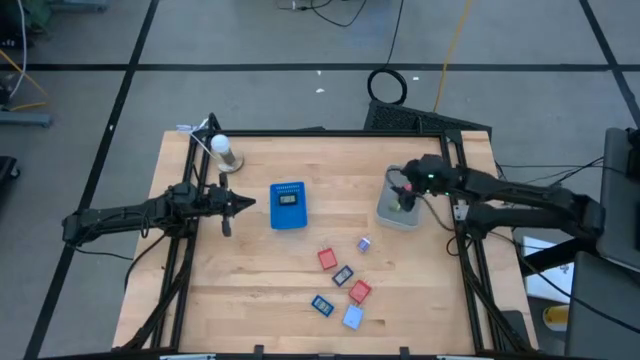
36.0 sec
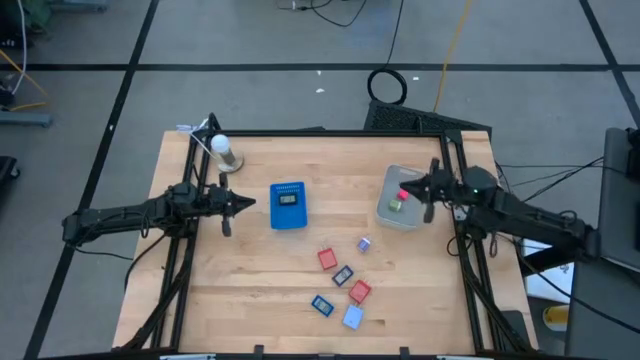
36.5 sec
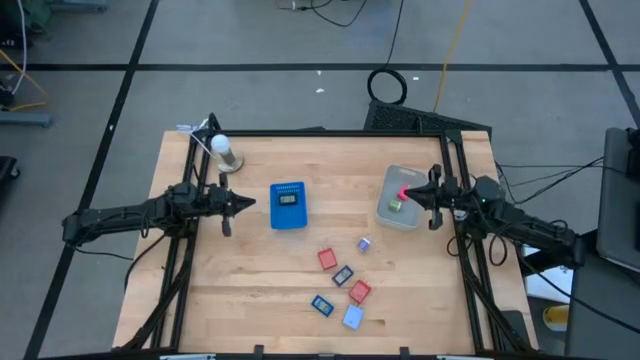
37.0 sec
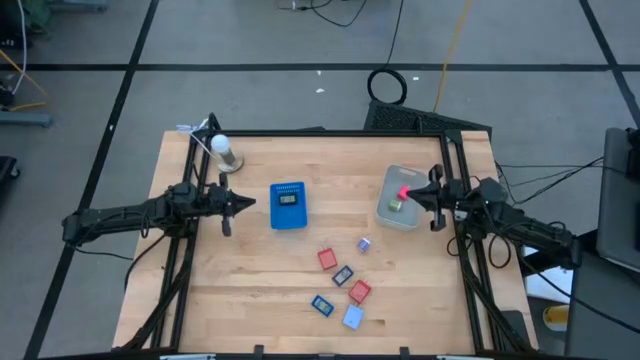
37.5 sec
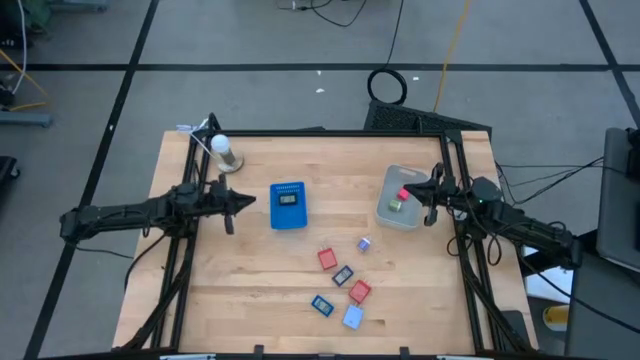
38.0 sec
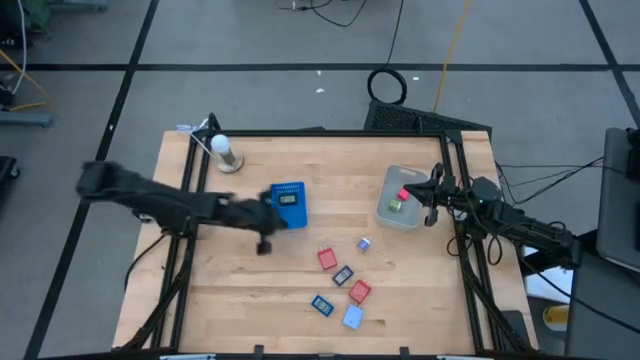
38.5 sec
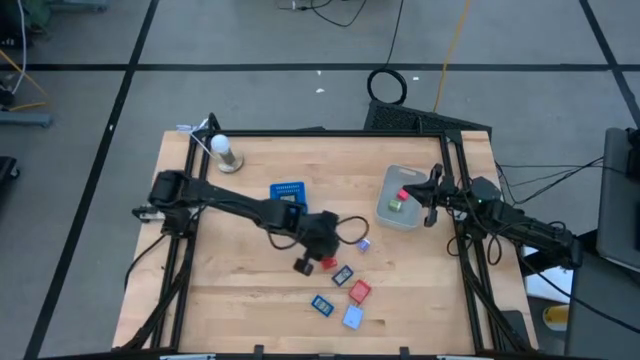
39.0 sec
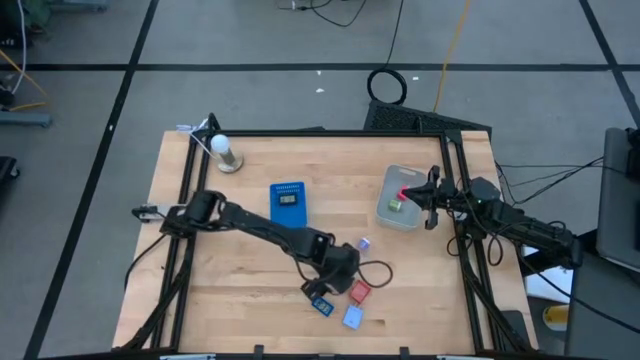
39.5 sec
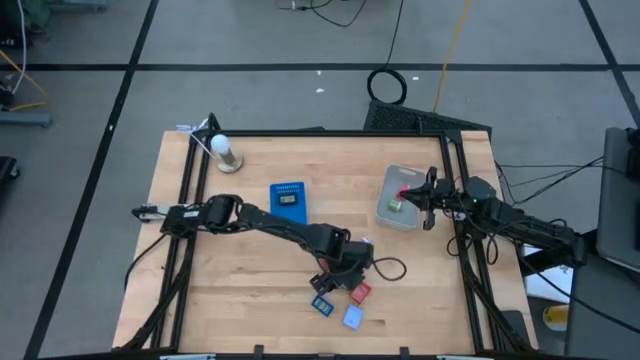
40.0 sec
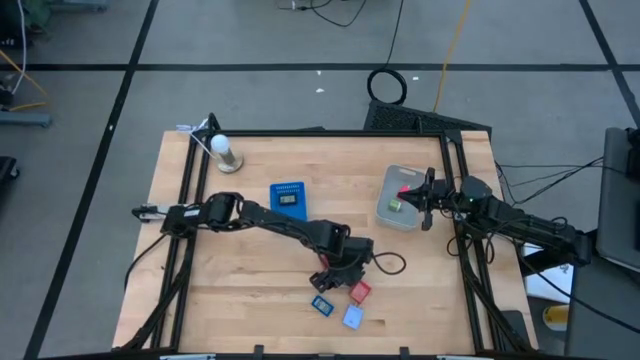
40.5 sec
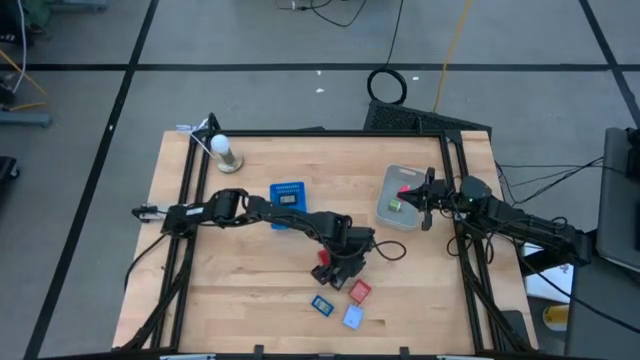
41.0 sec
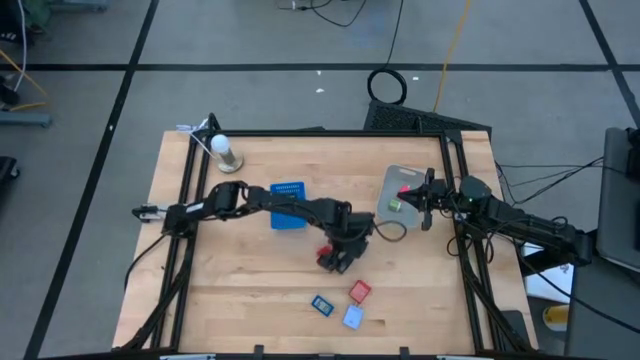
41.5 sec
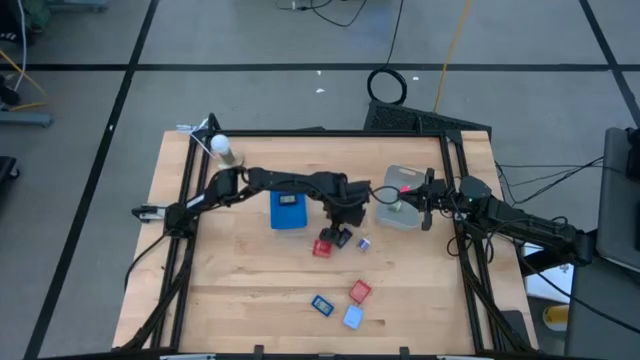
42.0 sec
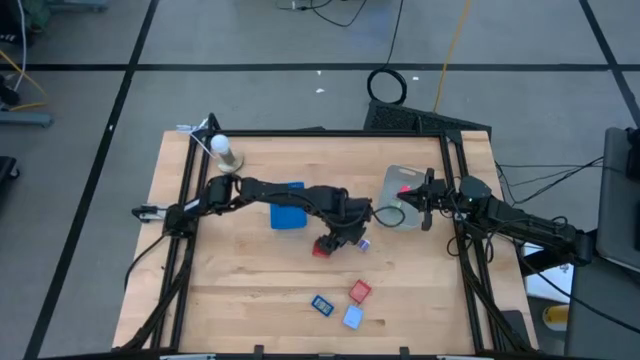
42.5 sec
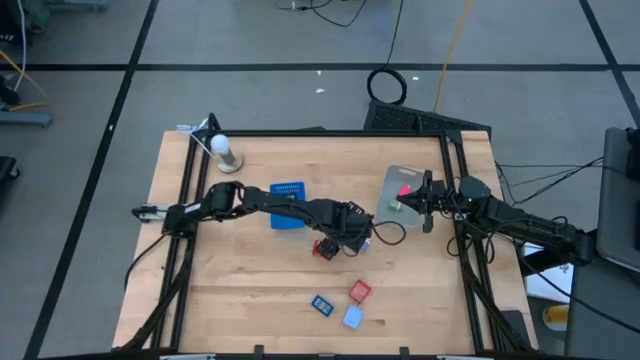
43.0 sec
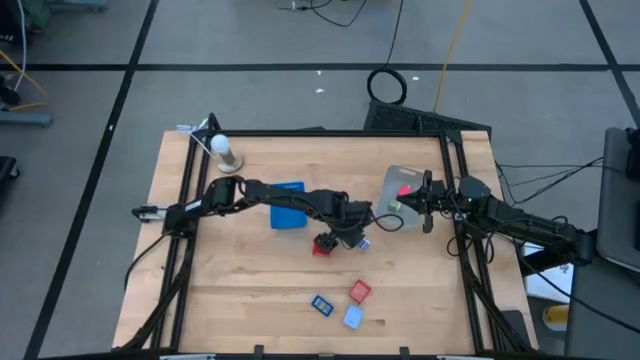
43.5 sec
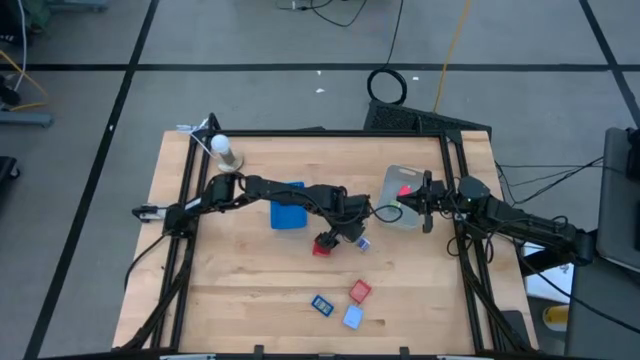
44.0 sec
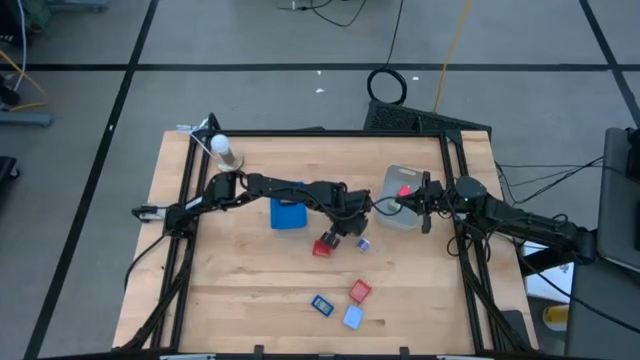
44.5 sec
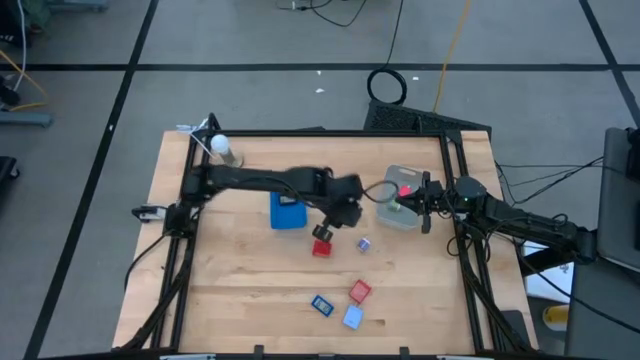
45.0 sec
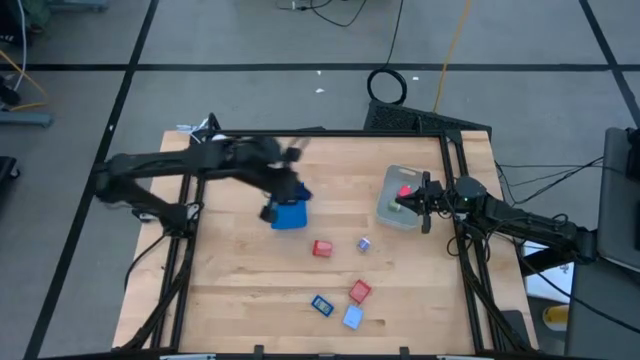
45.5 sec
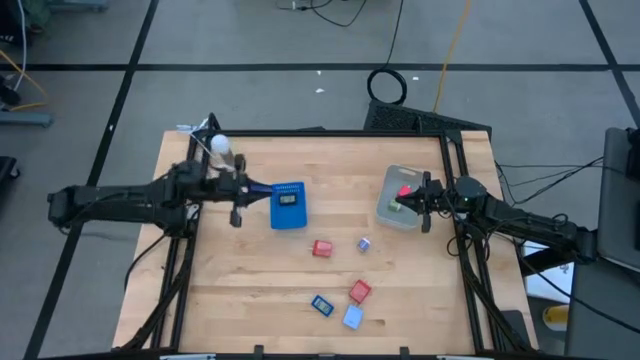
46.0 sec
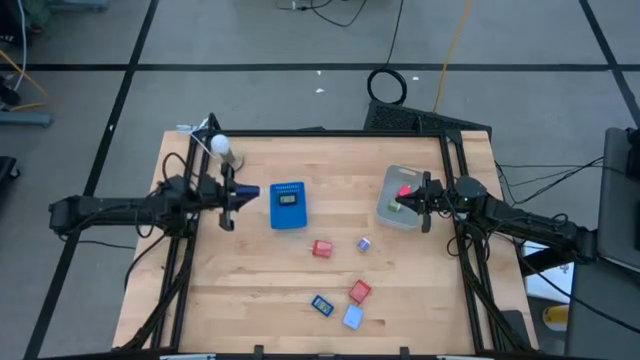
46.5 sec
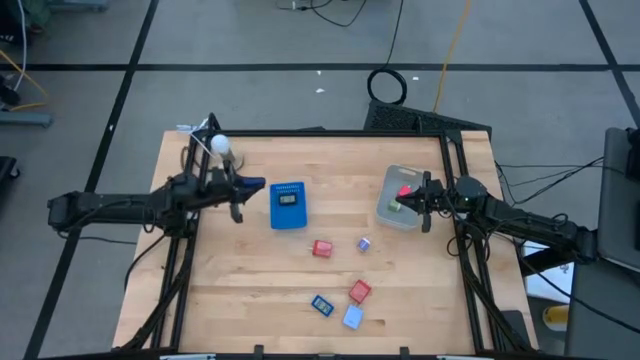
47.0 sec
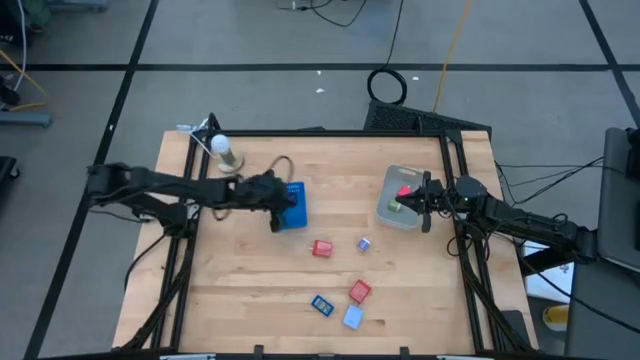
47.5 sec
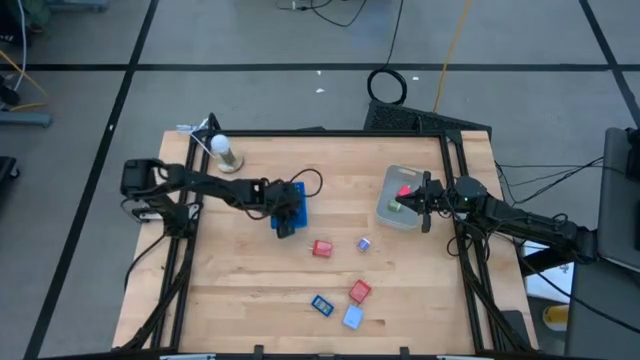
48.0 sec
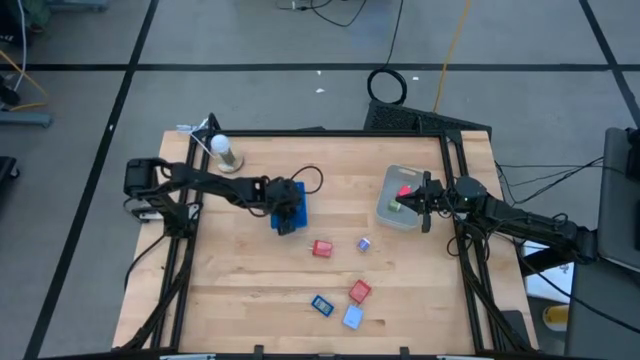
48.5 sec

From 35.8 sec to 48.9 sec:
Task: Pick & Place Office items
Put the purple digital clock into the blue bin

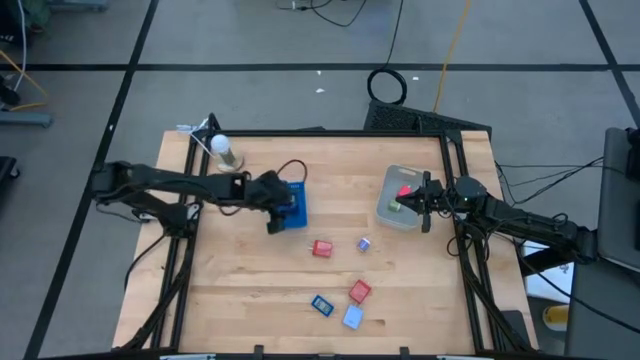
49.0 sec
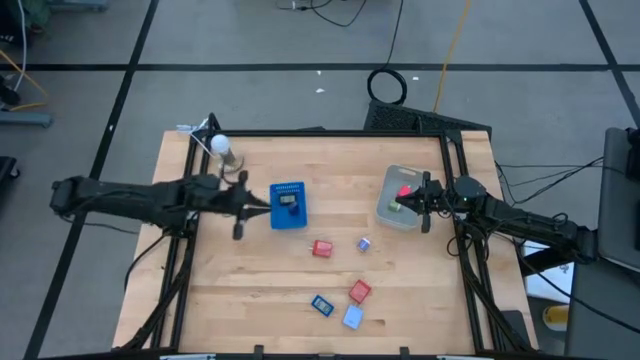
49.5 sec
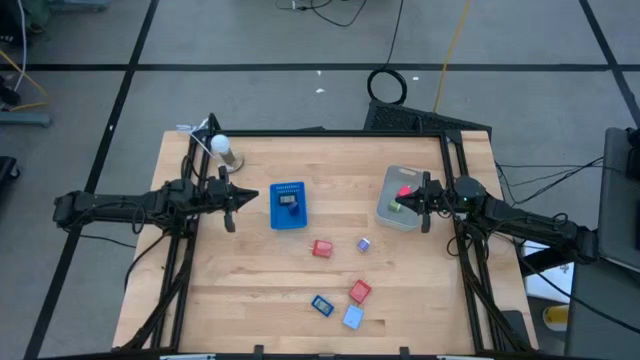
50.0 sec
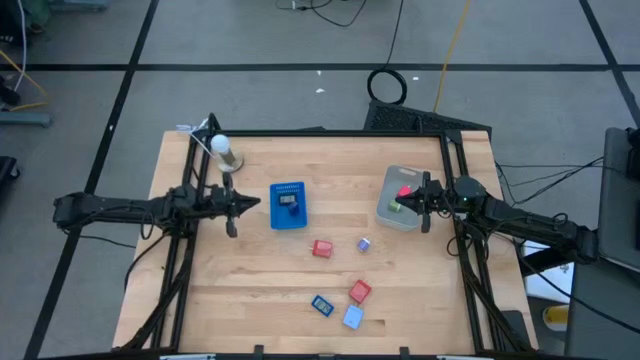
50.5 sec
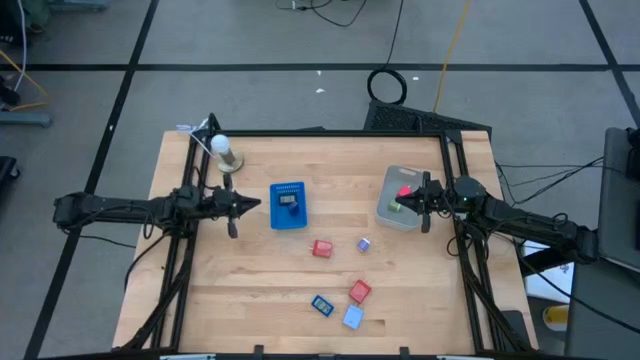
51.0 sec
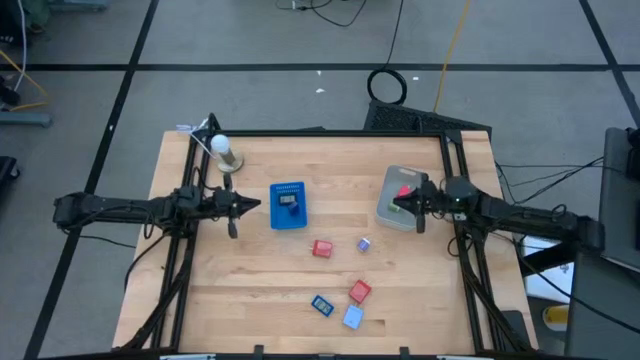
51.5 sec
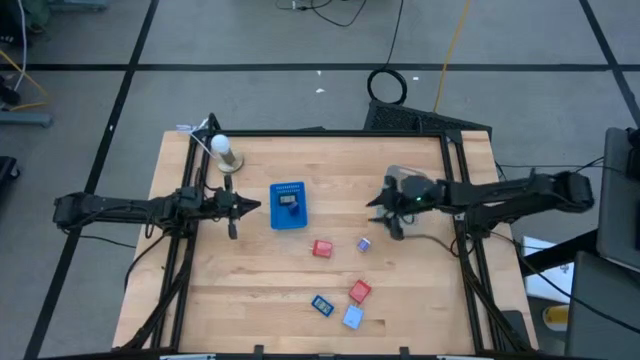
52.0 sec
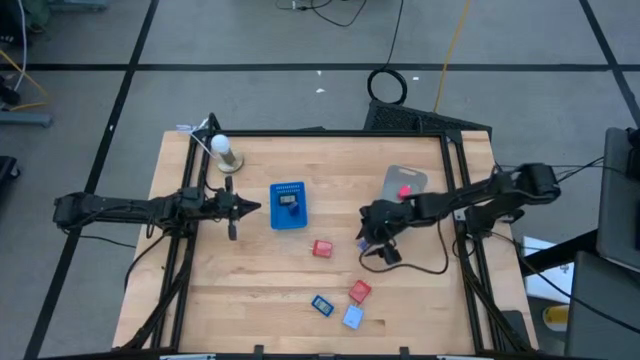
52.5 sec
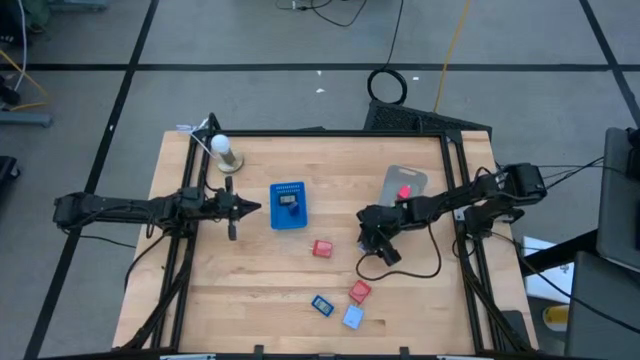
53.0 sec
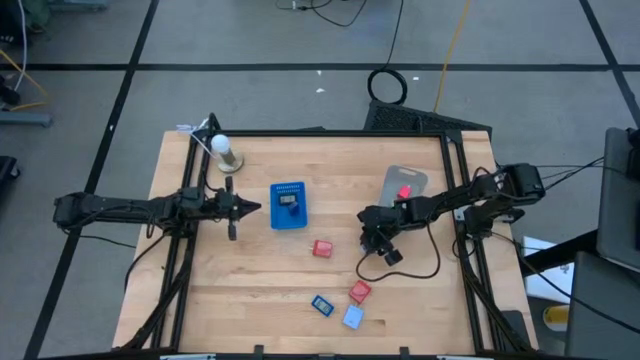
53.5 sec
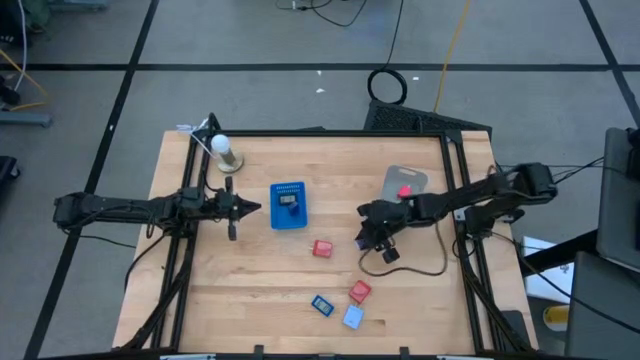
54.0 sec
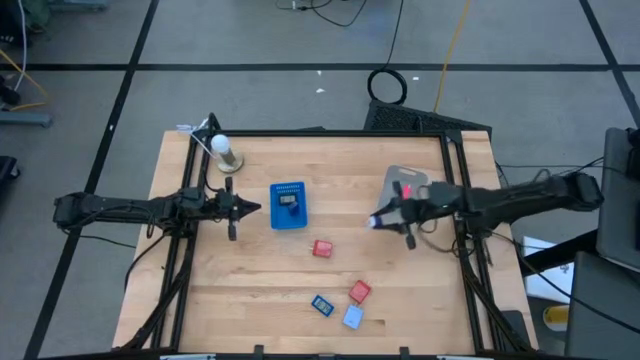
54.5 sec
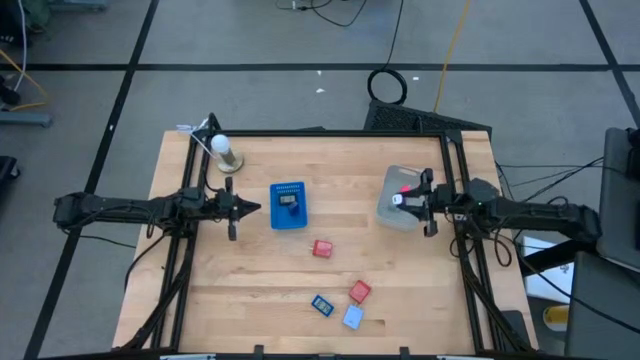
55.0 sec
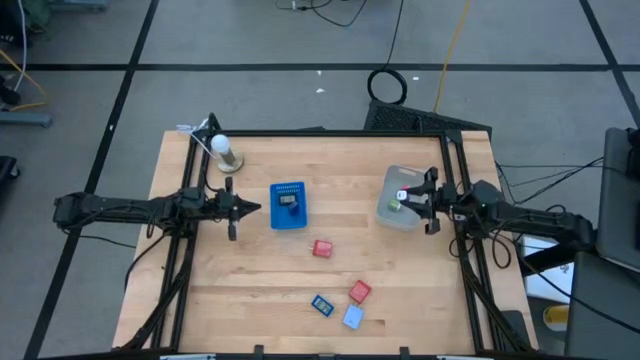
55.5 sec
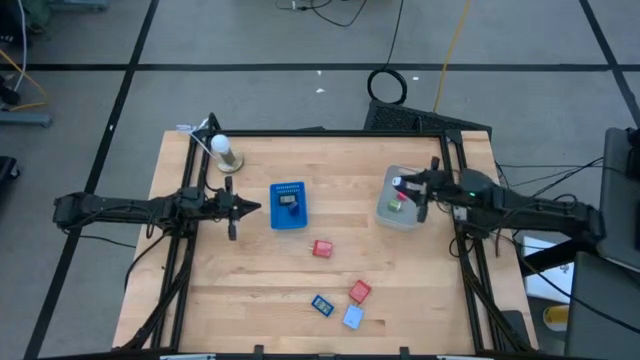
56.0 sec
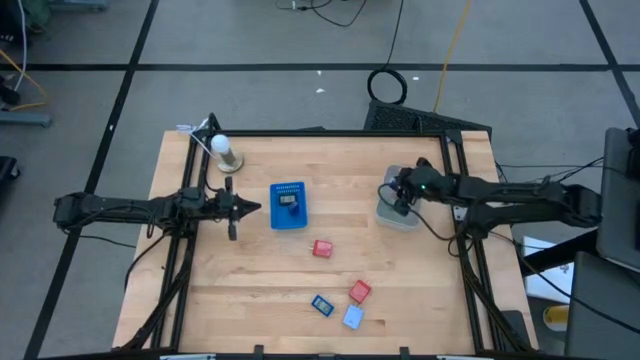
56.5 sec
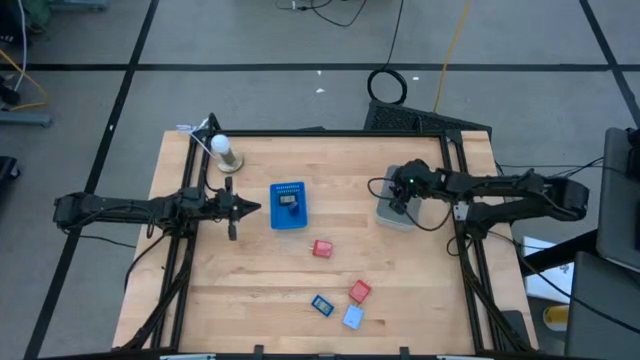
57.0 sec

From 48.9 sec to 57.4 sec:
Put the purple charger adapter into the white bin
